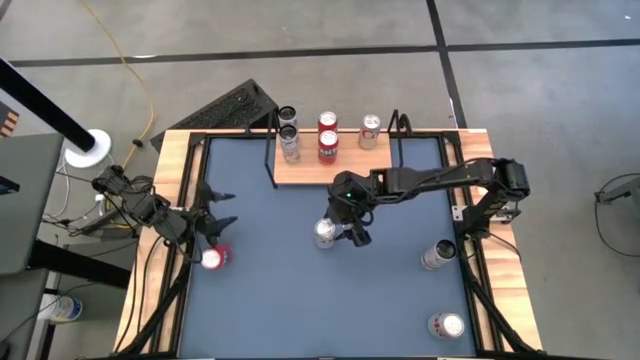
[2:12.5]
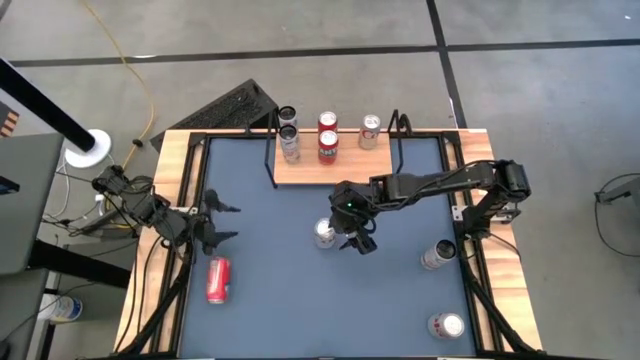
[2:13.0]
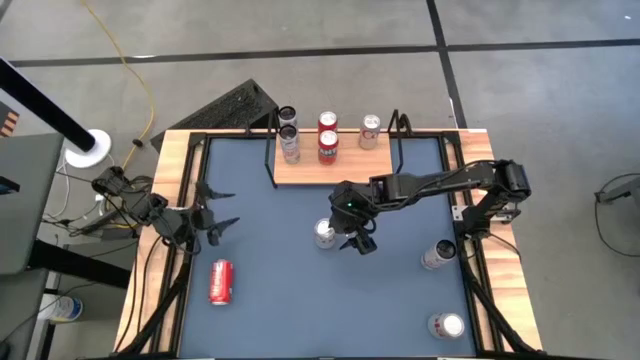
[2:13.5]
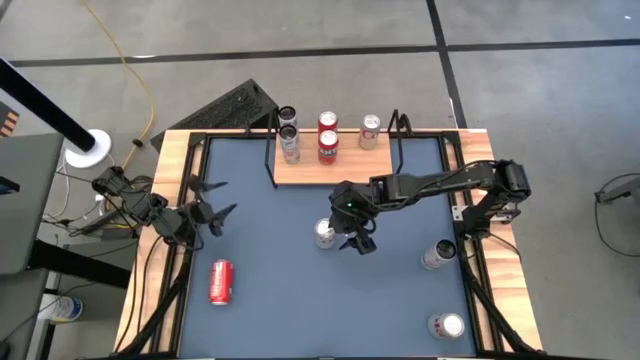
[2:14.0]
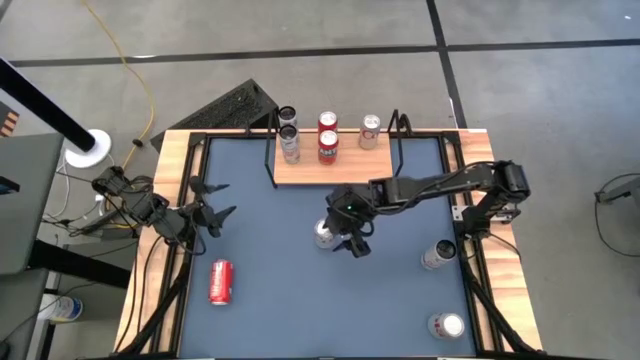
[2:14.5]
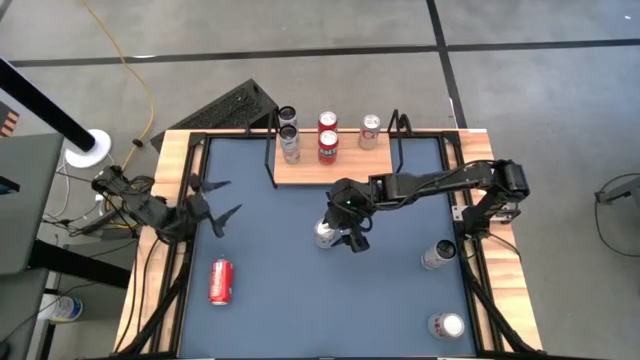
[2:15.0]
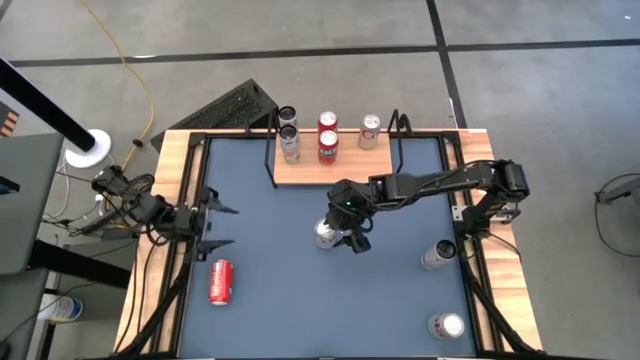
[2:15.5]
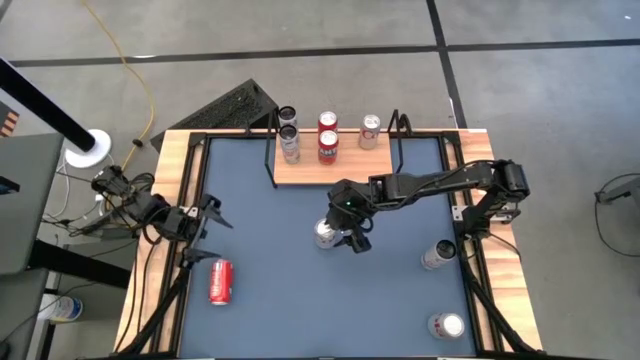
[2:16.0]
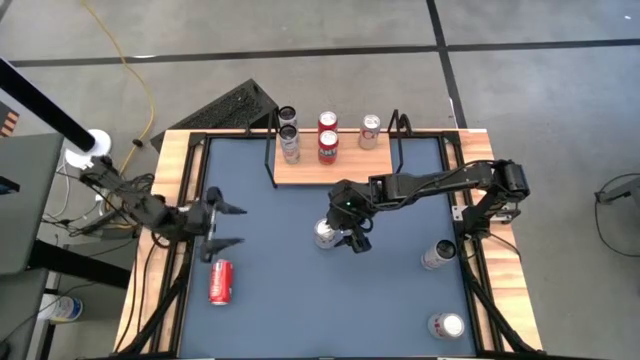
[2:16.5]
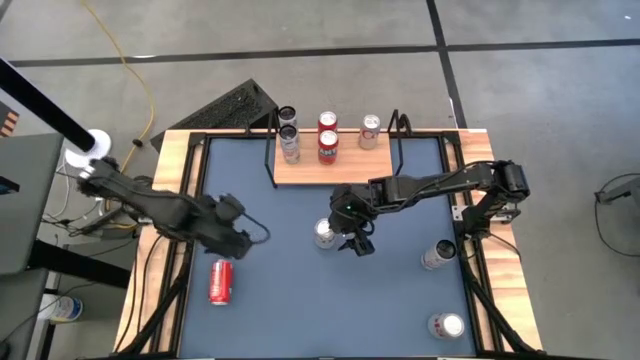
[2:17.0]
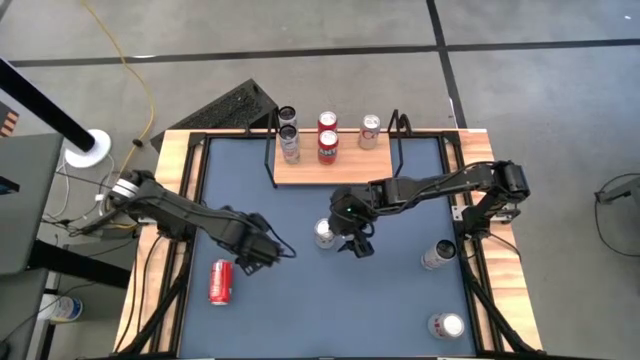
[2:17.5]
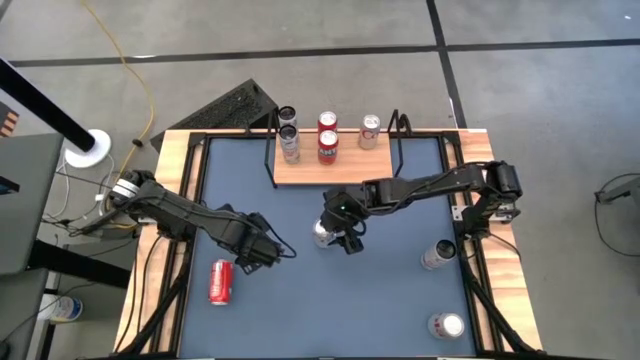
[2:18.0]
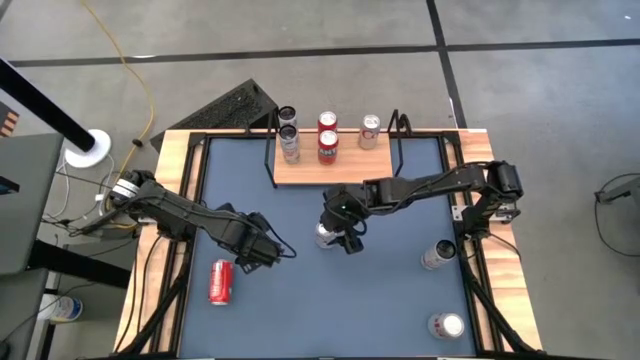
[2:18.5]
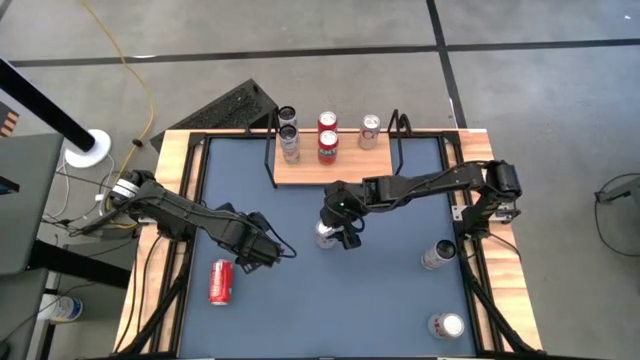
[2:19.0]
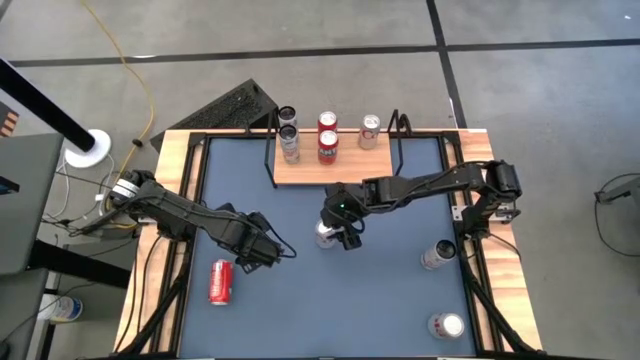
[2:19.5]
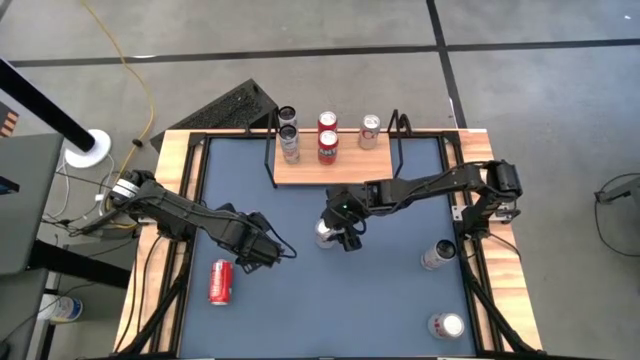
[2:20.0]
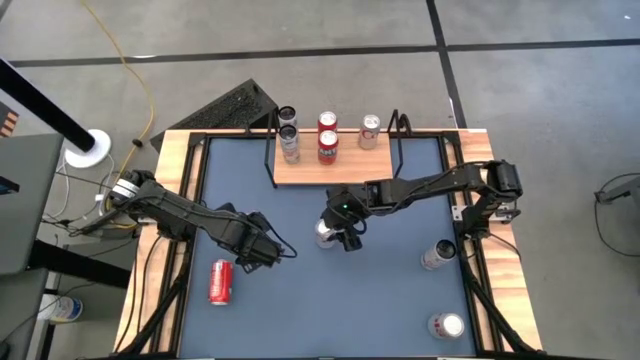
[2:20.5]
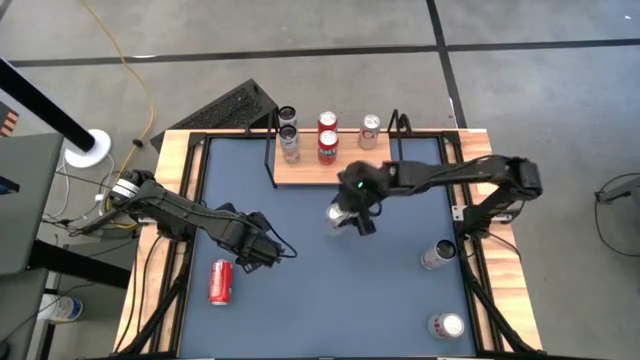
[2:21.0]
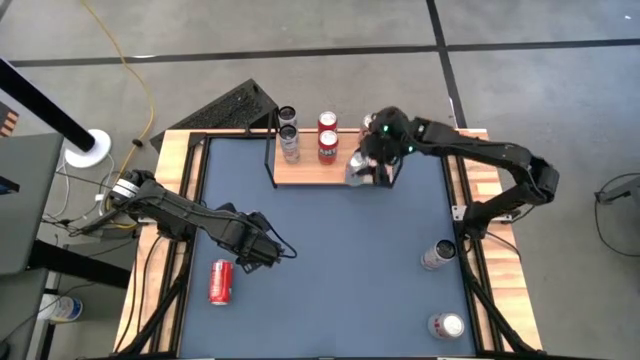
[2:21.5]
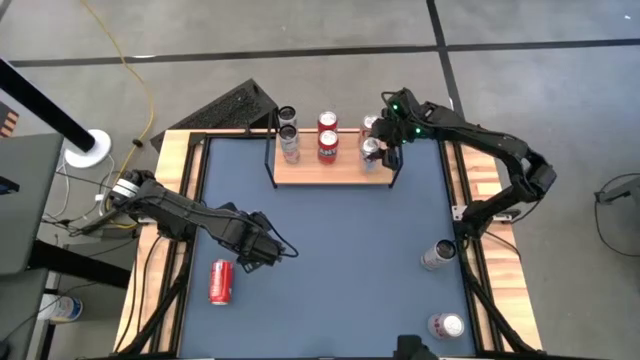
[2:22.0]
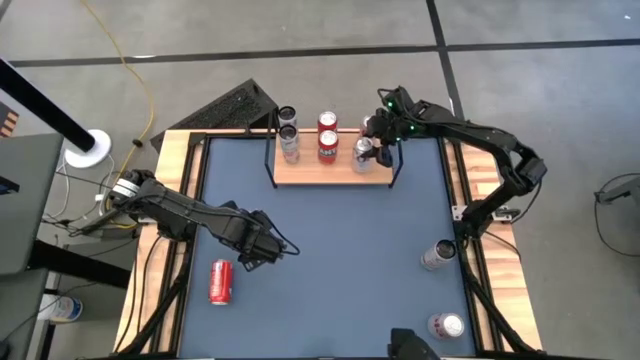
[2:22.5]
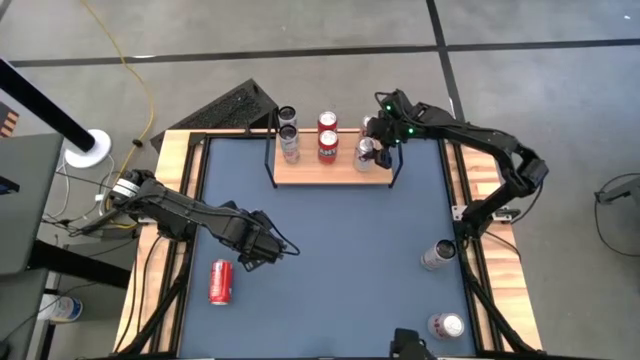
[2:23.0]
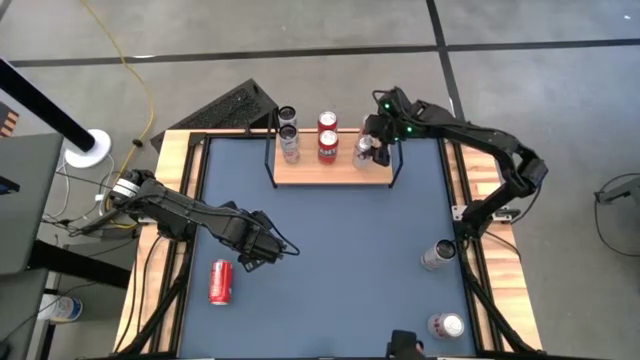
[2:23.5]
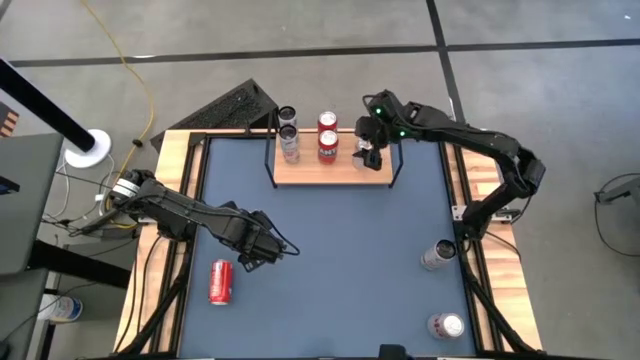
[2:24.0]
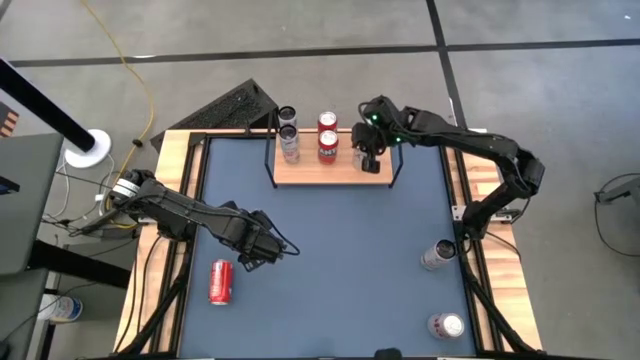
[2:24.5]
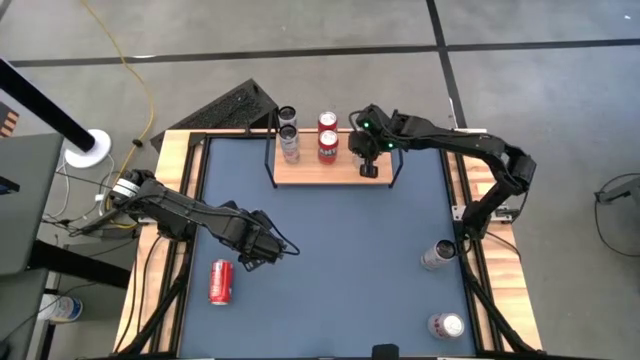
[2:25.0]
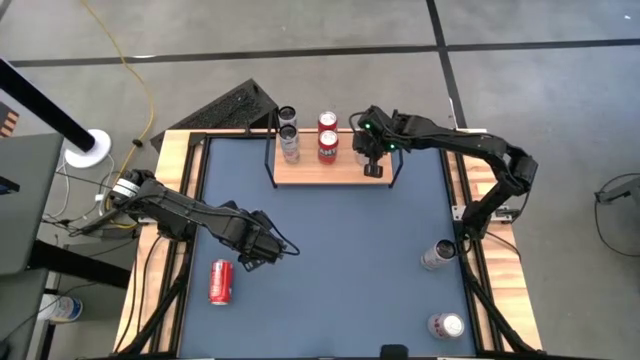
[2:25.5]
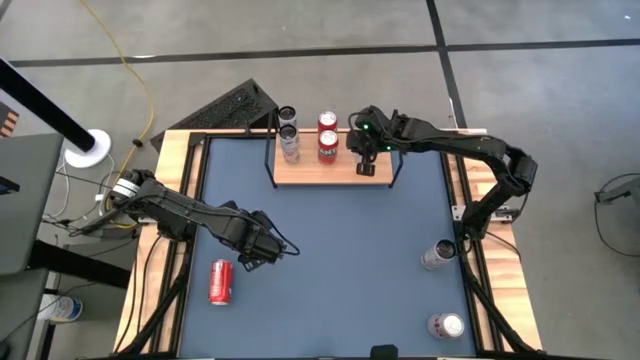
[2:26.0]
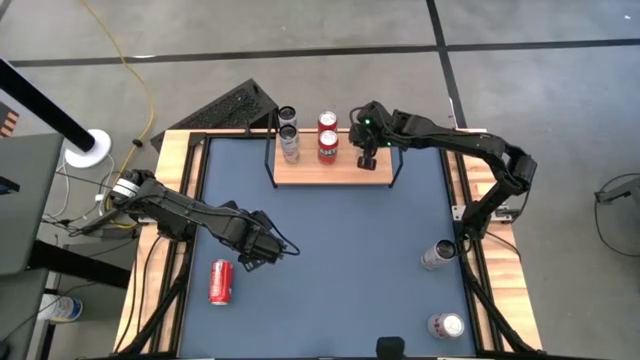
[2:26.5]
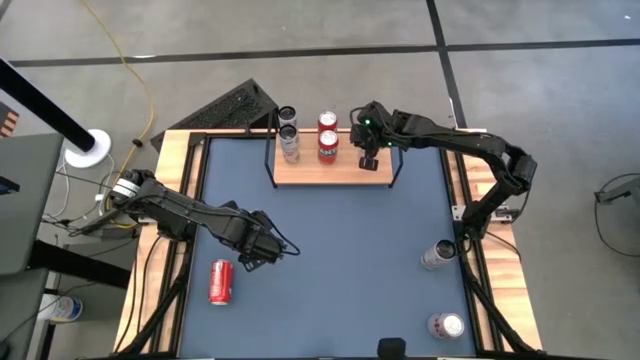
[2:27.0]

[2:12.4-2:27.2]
Task: Place canned beverage on shelf
Put the left red-silver soda can on the shelf aligned with the other red-silver soda can

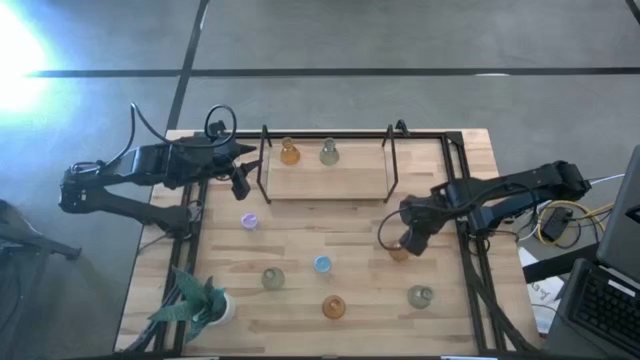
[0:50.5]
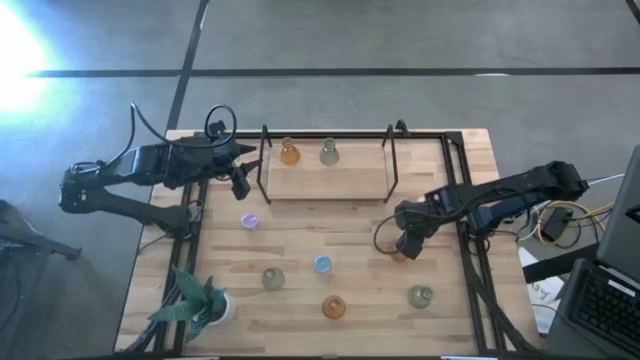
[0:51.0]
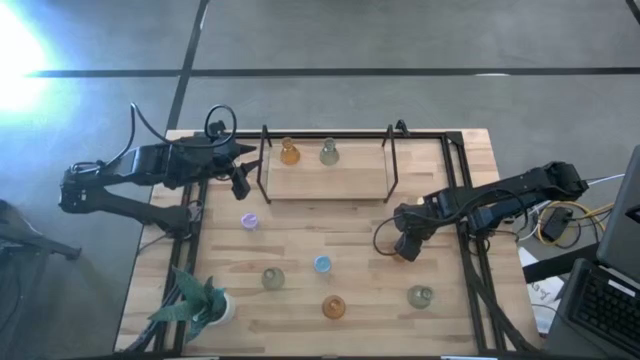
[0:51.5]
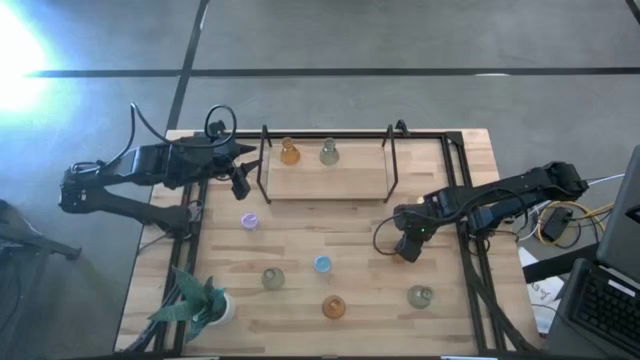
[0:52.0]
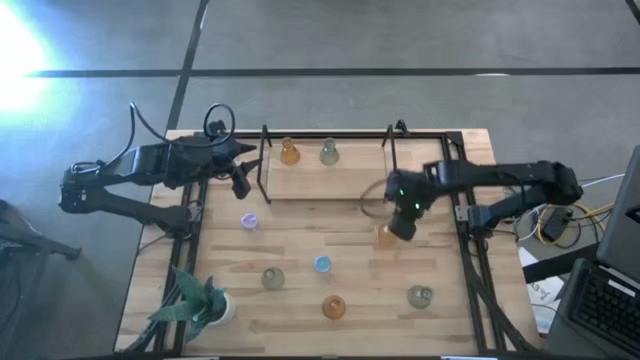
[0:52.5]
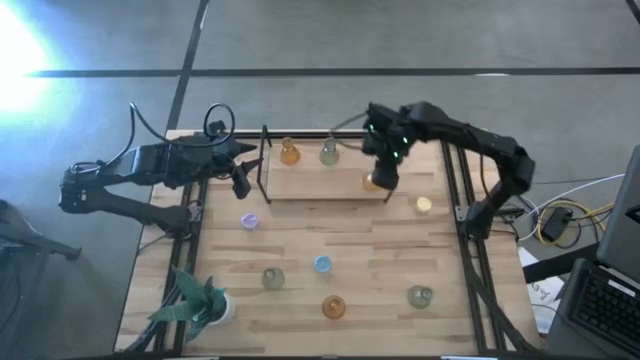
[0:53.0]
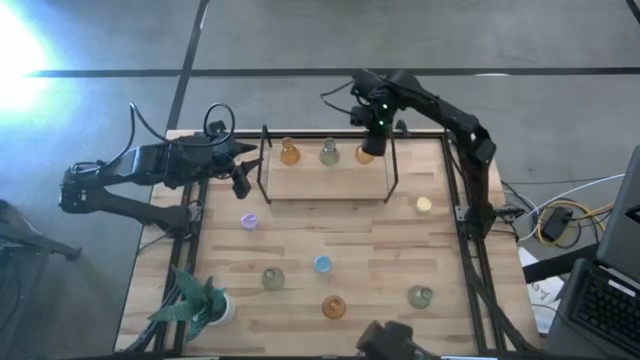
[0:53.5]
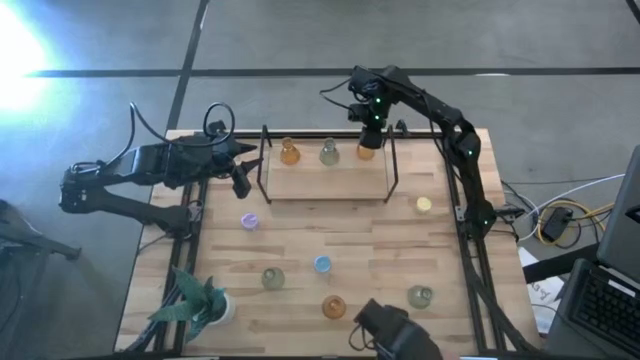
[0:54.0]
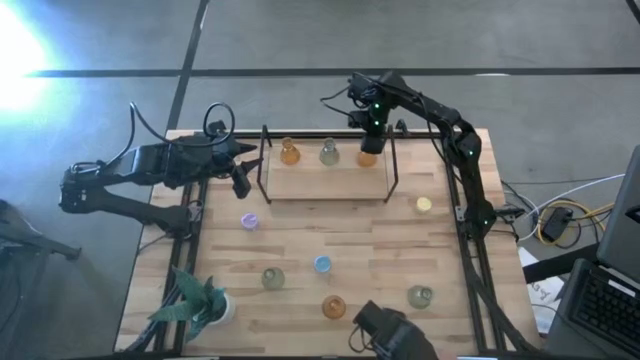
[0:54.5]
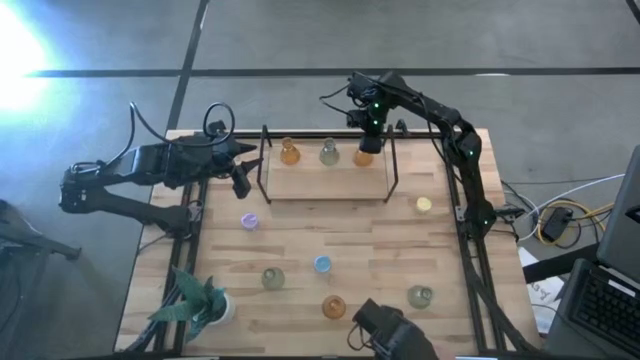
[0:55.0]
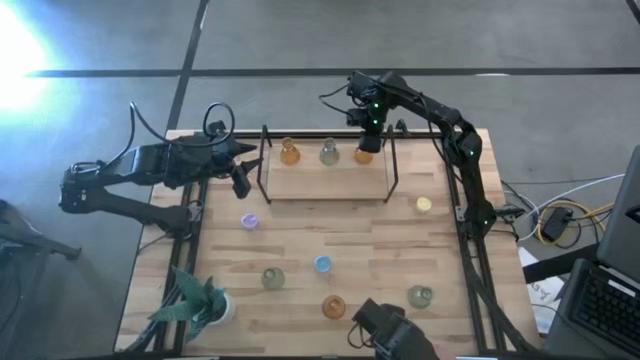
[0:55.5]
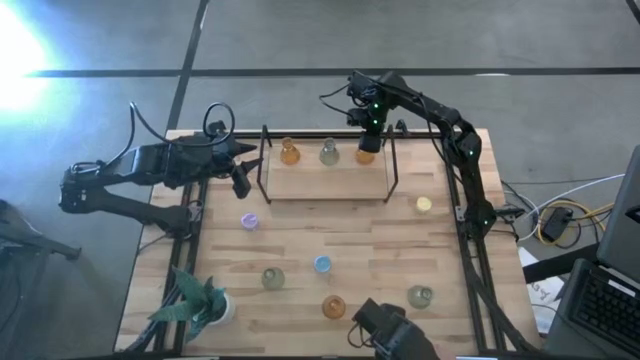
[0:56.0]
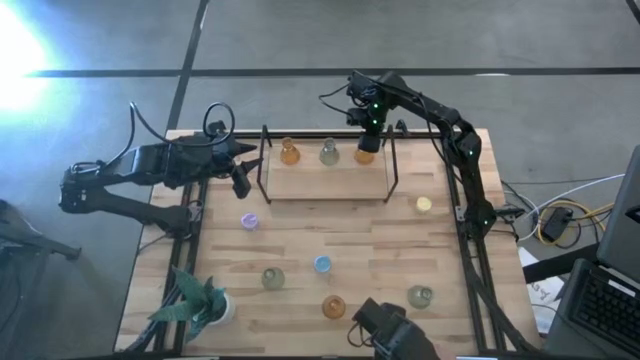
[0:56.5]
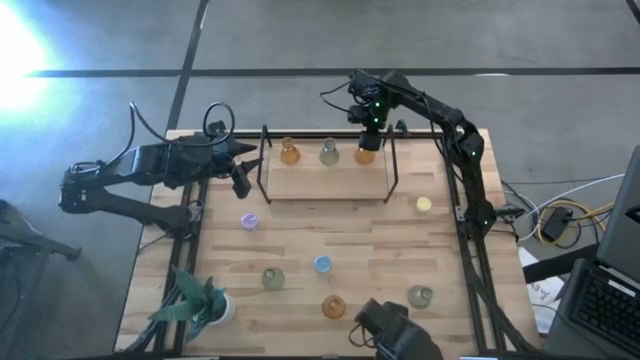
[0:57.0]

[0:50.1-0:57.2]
Task: Pick & Place candle stick holders
Put the top yellow glass candle holder on the shelf
